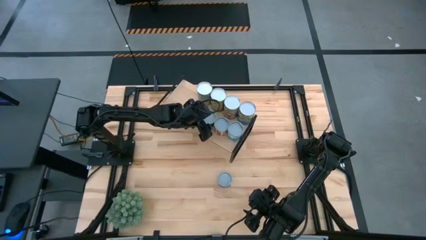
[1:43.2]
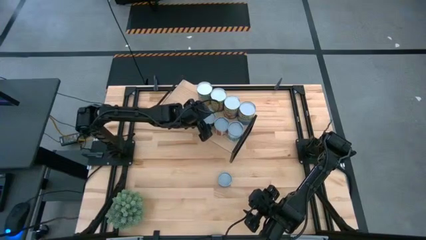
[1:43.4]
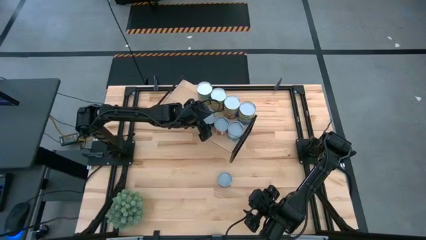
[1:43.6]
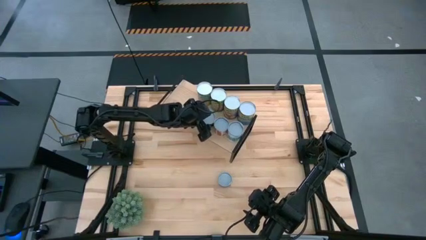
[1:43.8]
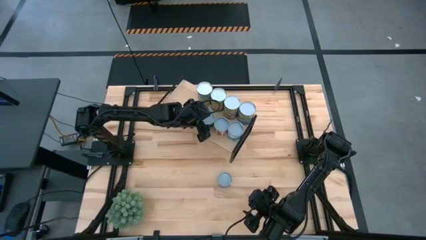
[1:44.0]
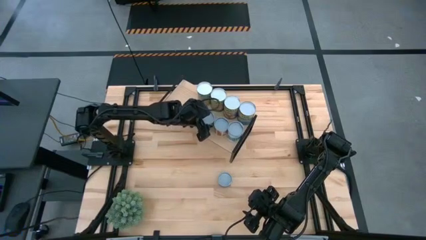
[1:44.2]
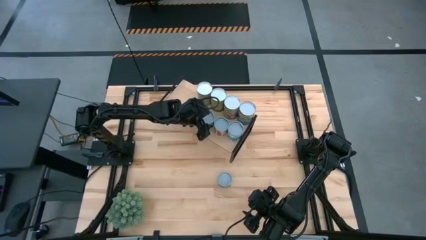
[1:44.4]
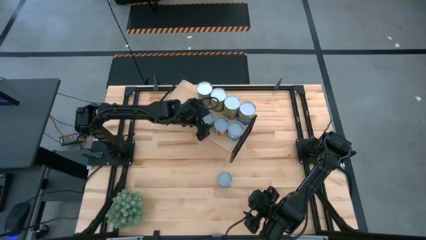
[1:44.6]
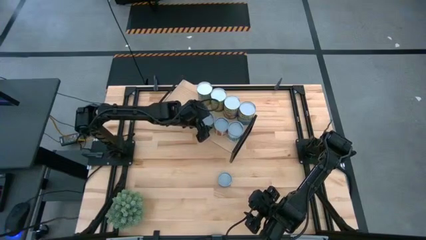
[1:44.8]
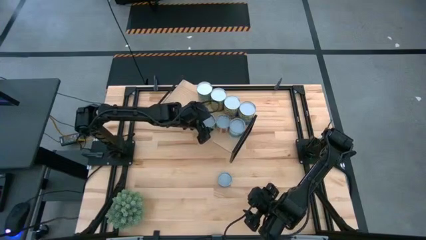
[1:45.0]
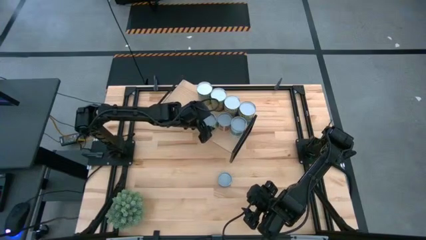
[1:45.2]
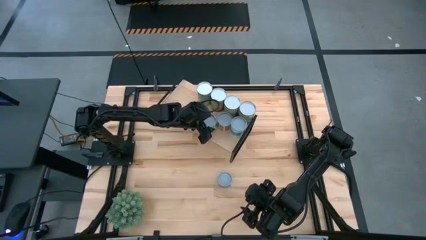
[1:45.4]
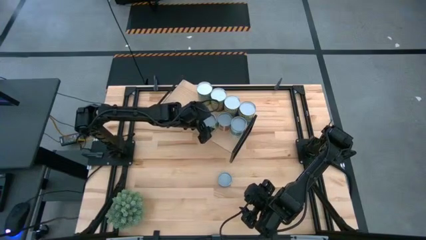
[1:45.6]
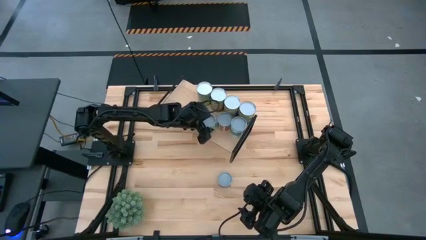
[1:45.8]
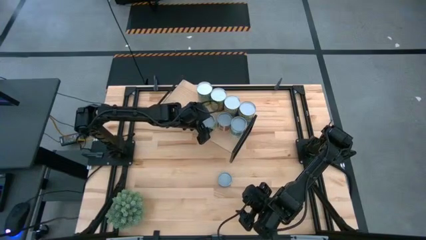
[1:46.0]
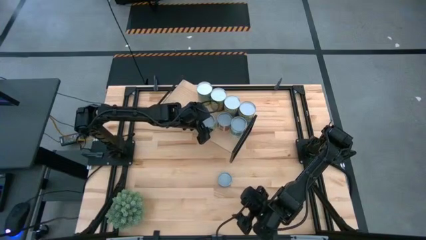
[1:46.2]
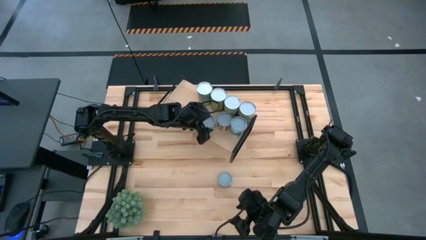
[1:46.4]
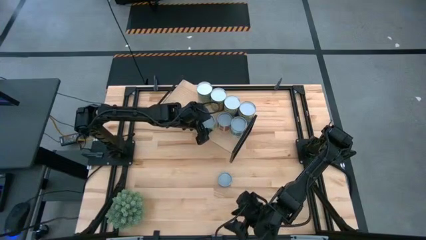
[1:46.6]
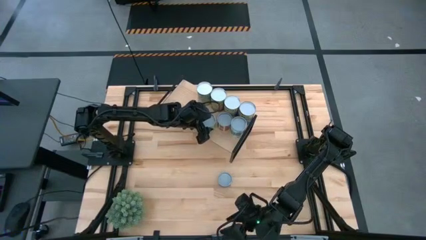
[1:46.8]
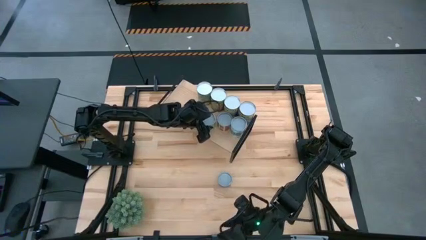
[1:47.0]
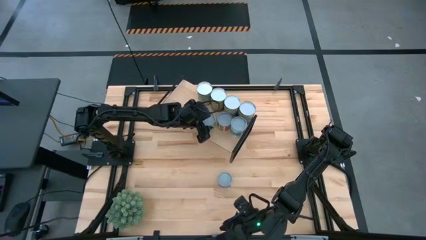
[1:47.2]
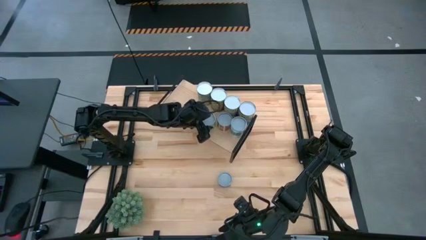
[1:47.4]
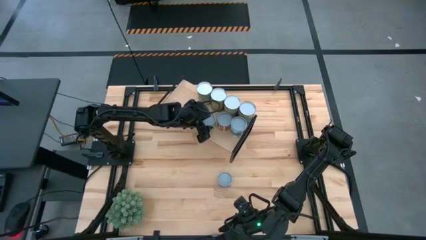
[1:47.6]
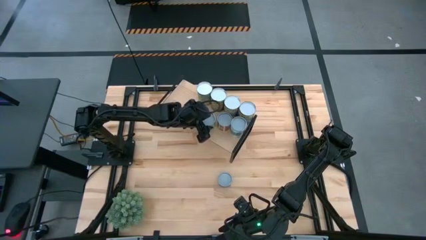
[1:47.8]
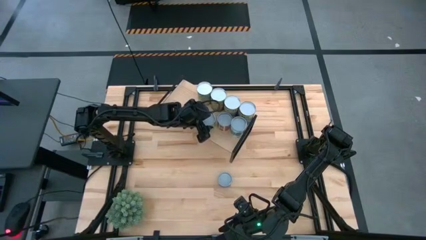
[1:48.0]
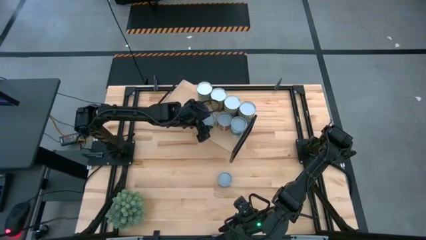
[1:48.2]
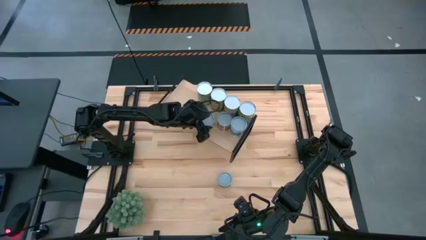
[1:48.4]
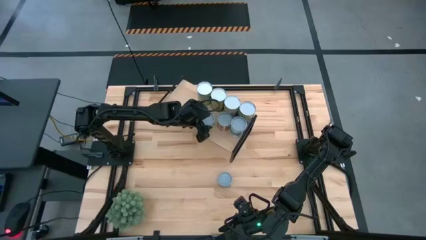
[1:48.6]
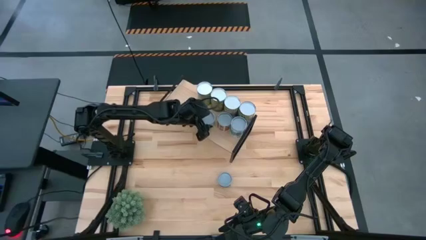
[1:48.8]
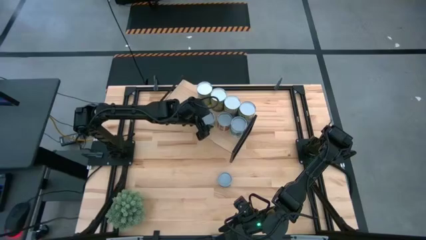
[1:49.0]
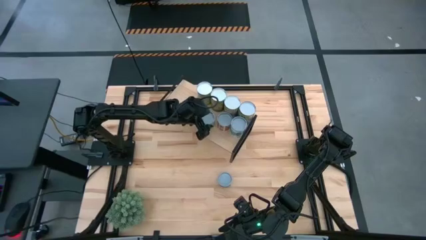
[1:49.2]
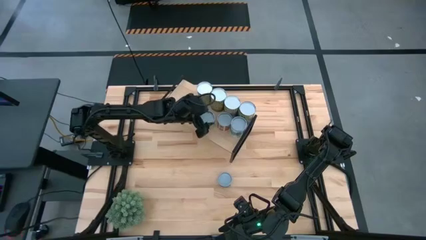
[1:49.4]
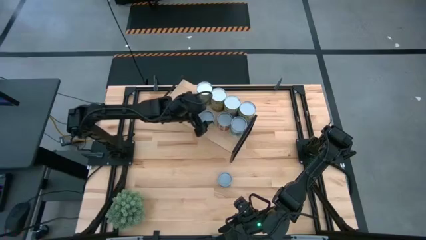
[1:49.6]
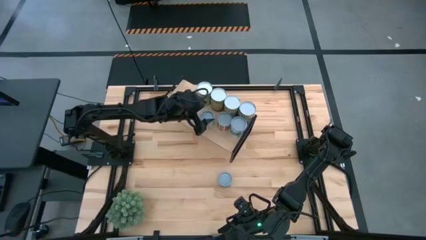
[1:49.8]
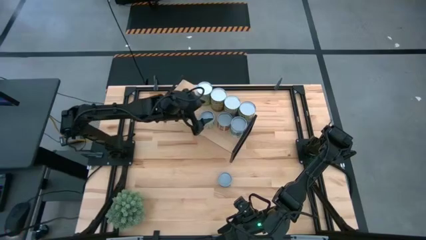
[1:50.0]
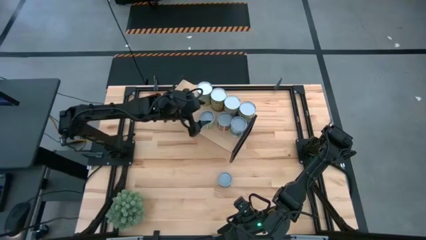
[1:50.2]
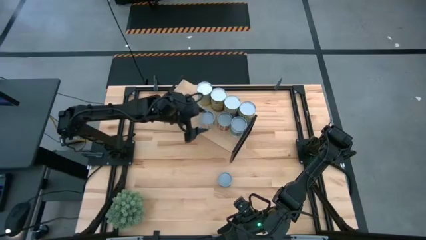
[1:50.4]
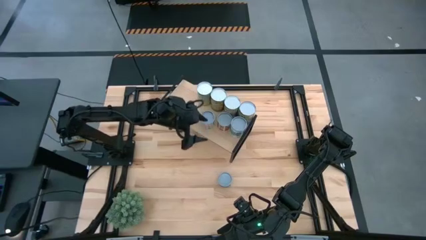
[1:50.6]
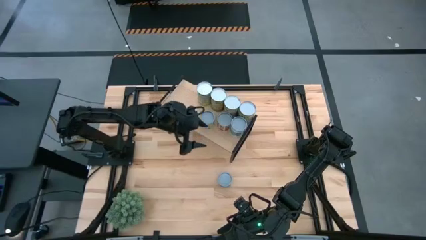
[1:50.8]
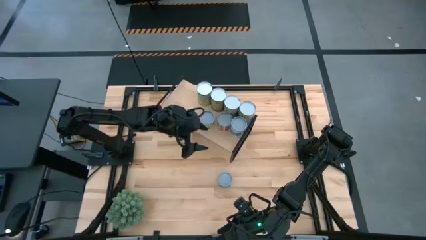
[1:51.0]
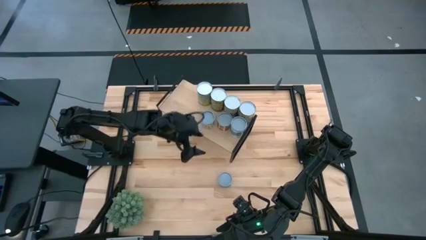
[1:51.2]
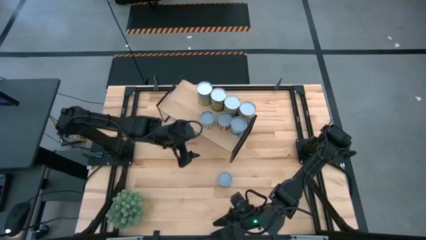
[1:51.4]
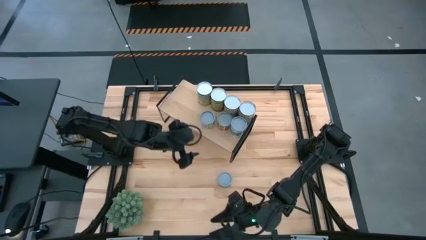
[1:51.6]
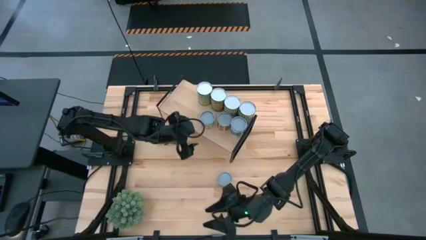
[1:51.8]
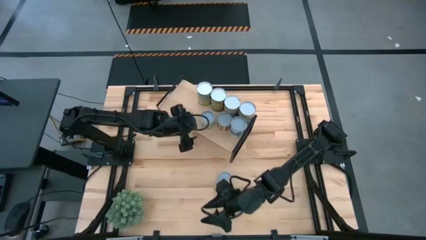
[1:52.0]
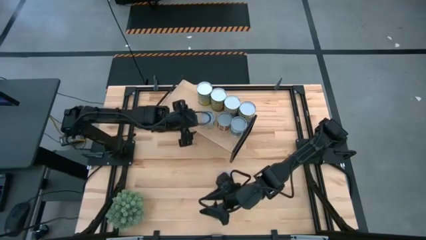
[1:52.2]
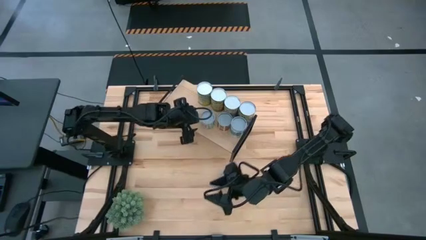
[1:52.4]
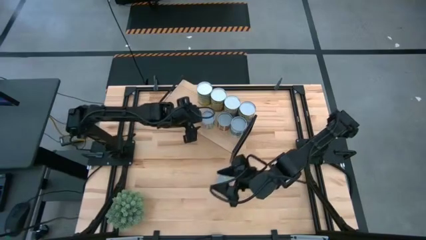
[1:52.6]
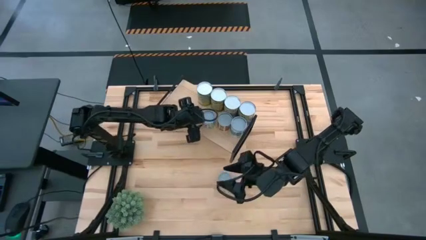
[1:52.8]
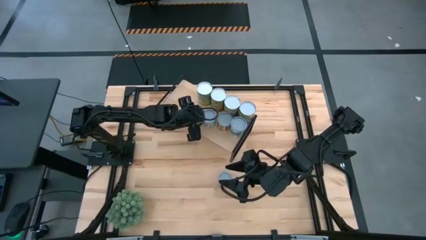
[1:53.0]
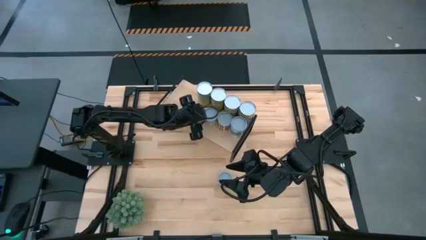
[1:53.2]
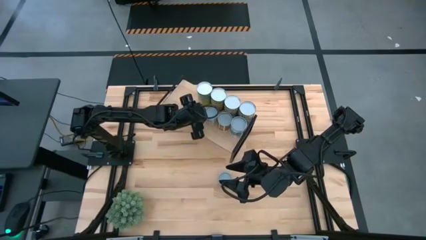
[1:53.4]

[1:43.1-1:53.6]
Task: Pick and place cans onto a shelf
Put the small canned peas on the shelf

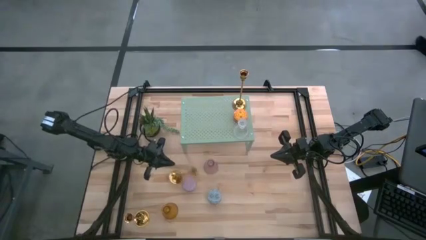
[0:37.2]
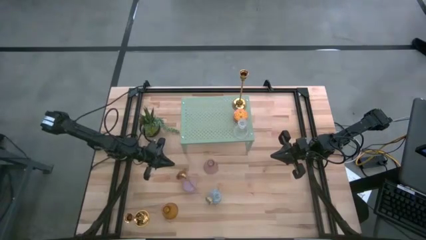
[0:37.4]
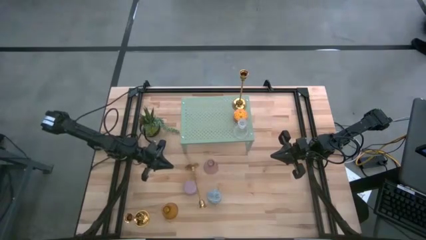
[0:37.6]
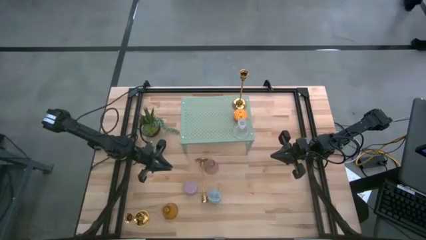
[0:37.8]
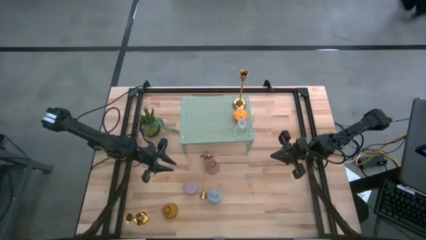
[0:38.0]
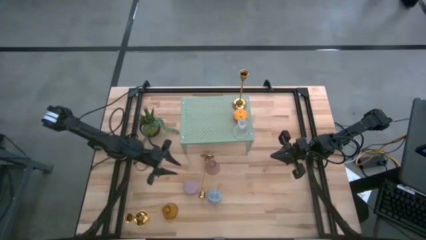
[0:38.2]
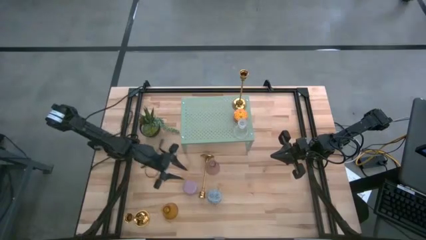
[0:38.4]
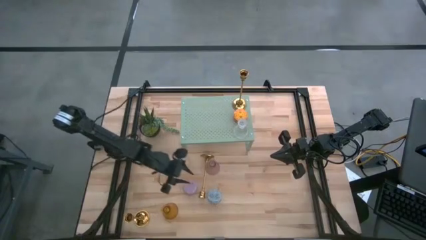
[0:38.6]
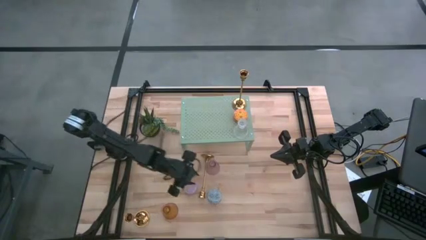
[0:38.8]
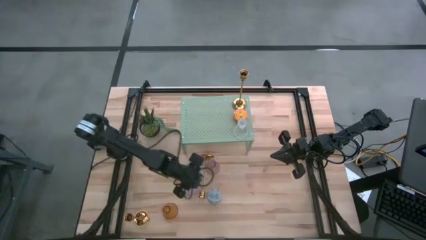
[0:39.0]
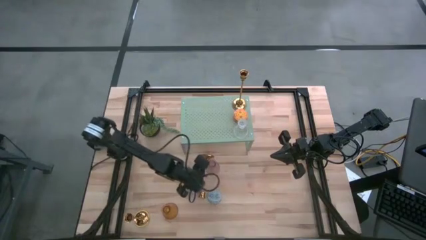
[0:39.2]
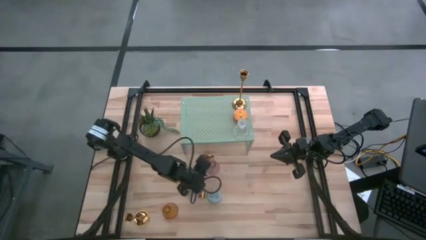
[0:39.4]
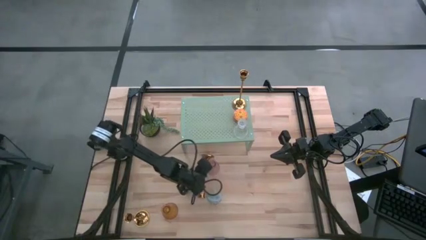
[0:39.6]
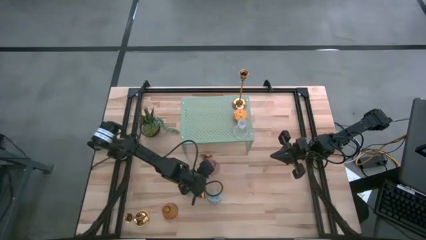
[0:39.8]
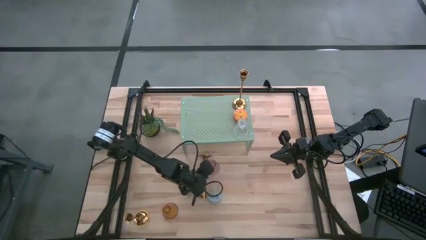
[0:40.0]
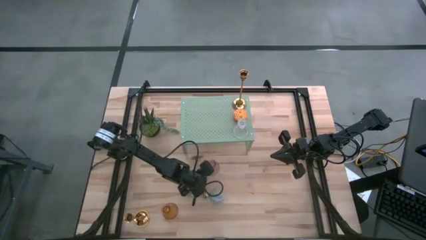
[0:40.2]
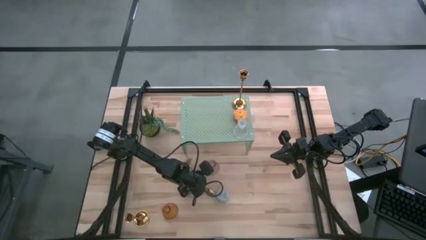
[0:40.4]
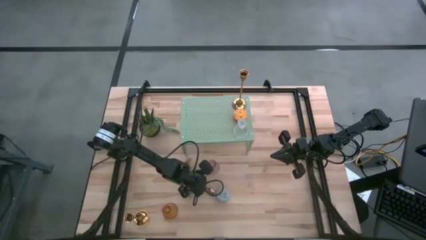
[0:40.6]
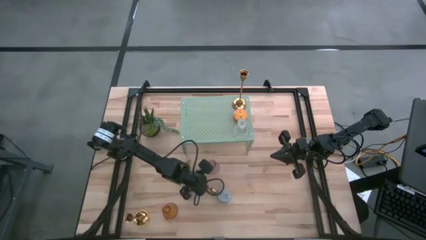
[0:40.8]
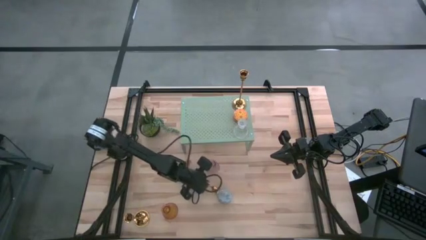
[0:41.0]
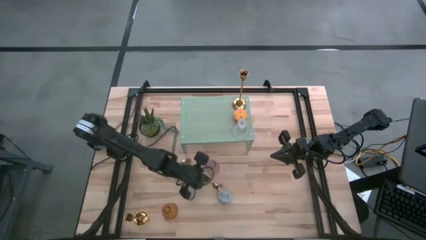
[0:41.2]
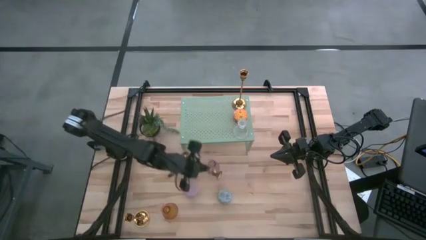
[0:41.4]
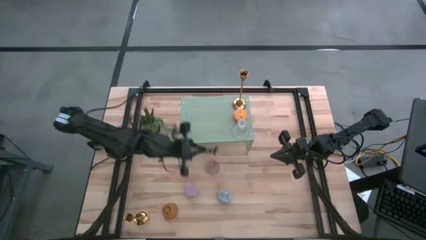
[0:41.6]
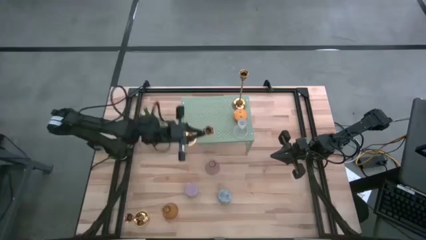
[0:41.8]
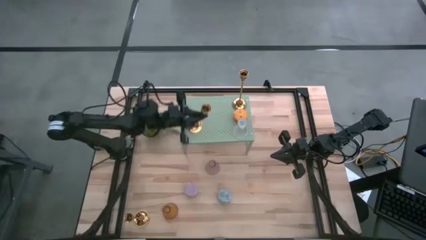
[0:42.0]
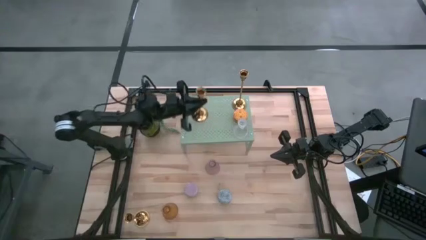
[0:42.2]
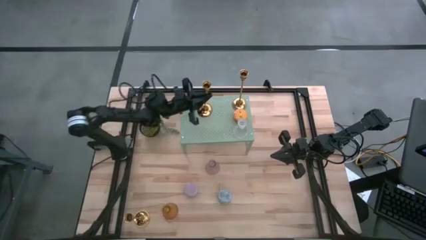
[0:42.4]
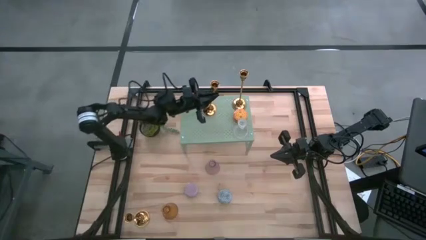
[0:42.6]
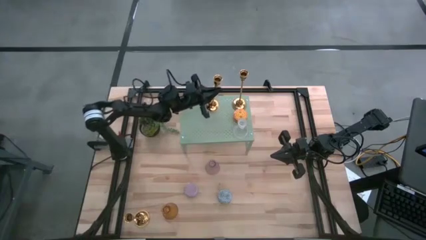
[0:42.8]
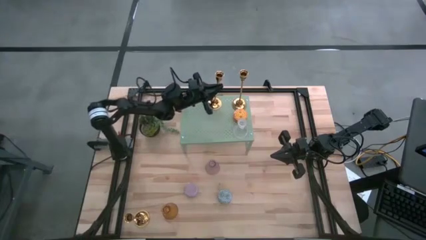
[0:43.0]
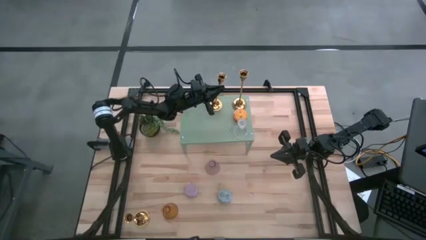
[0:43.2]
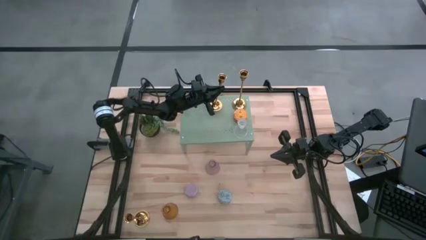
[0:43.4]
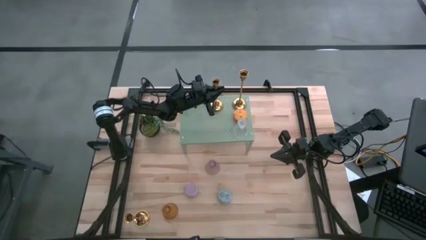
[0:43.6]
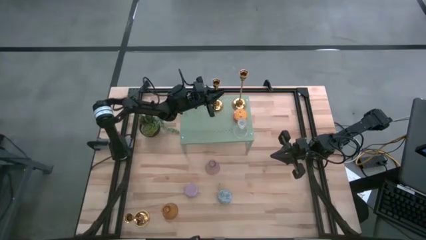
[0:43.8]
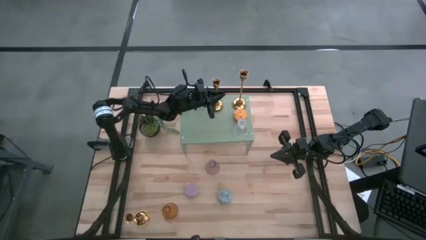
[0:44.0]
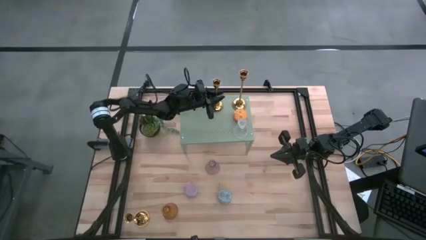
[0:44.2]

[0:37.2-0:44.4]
Task: Pick & Place candle stick holders
Put the top gold candle holder on the shelf
